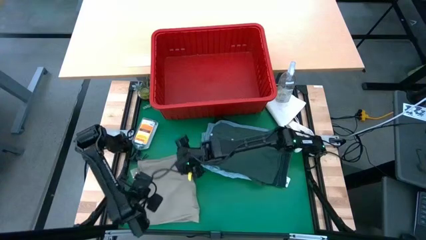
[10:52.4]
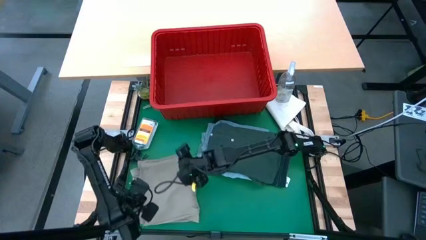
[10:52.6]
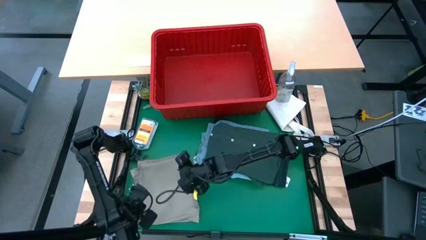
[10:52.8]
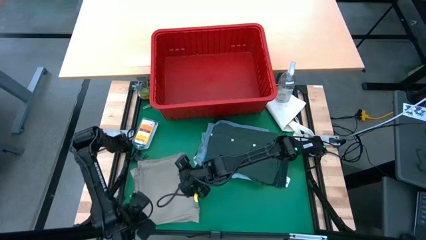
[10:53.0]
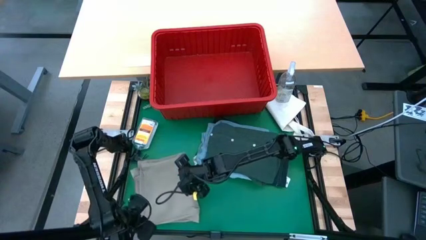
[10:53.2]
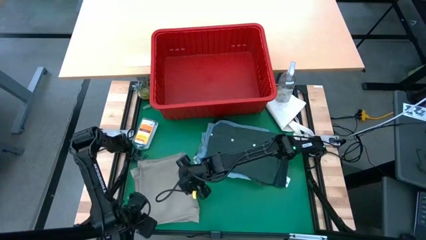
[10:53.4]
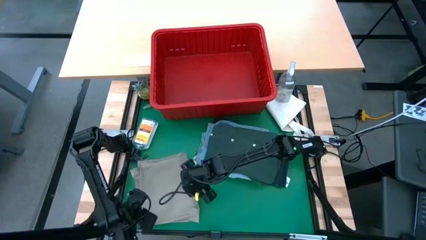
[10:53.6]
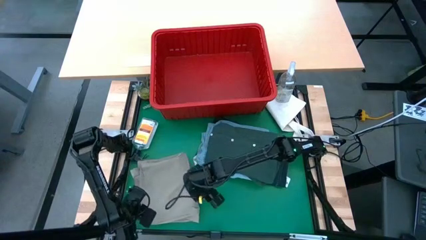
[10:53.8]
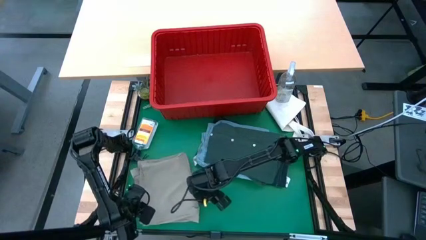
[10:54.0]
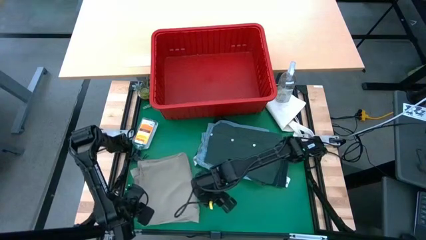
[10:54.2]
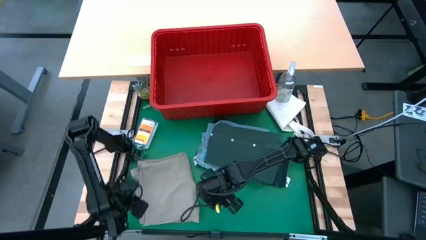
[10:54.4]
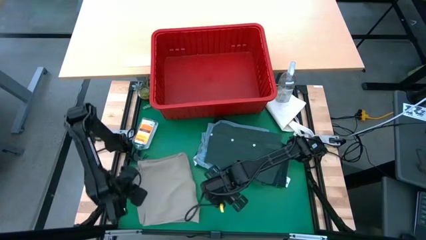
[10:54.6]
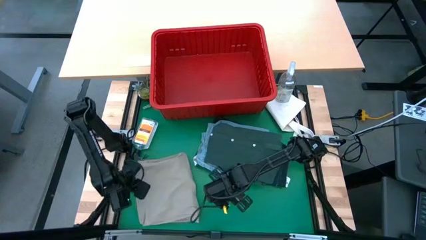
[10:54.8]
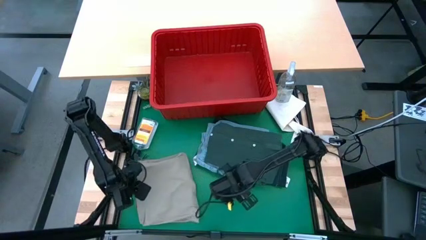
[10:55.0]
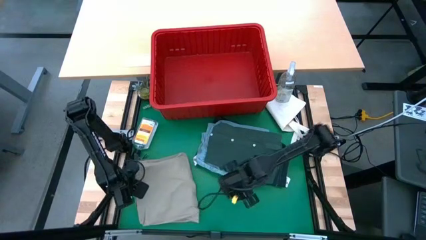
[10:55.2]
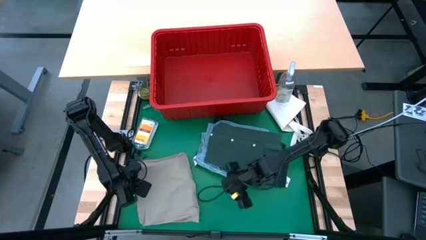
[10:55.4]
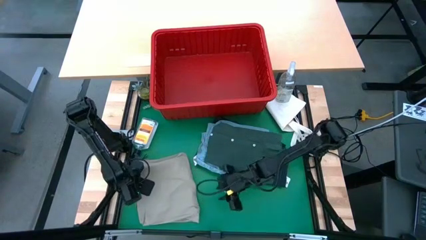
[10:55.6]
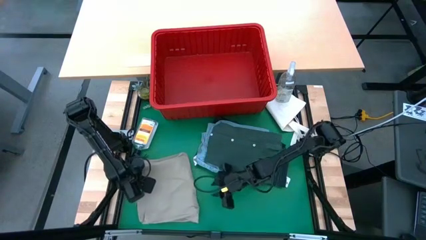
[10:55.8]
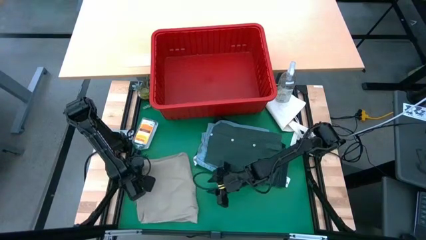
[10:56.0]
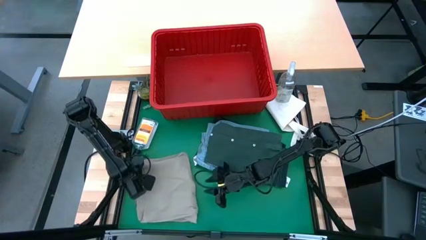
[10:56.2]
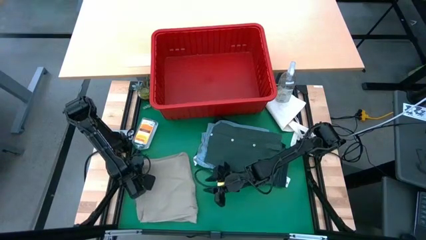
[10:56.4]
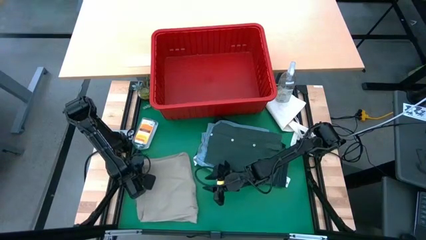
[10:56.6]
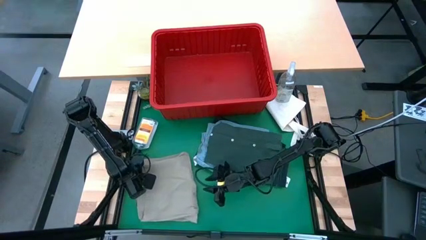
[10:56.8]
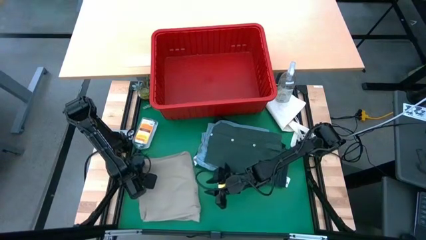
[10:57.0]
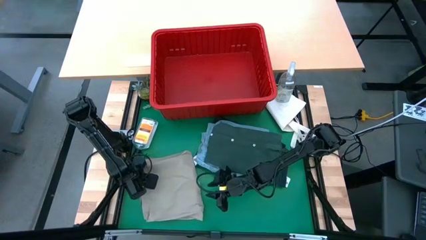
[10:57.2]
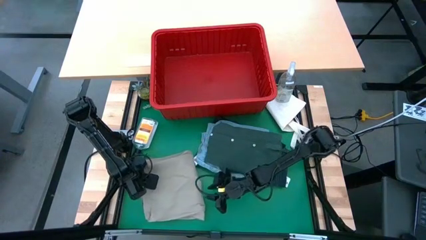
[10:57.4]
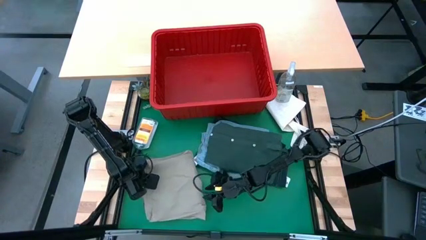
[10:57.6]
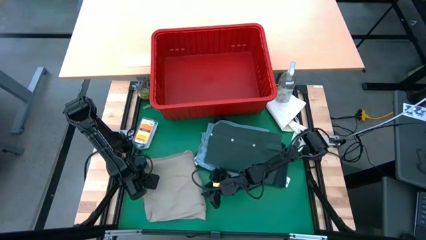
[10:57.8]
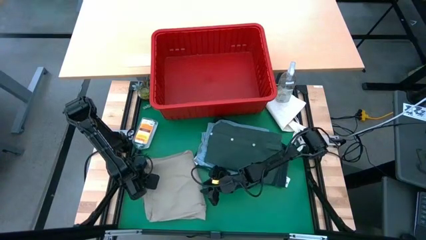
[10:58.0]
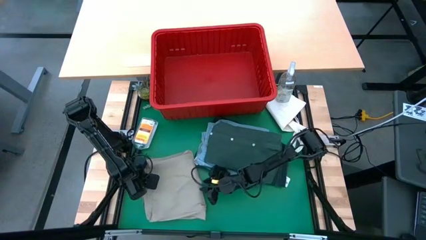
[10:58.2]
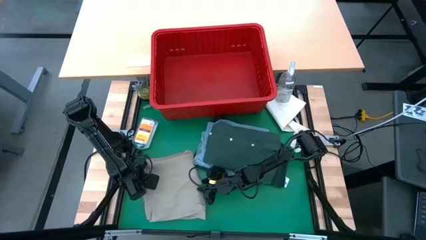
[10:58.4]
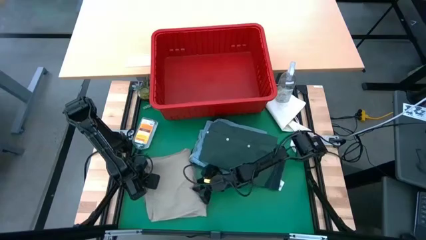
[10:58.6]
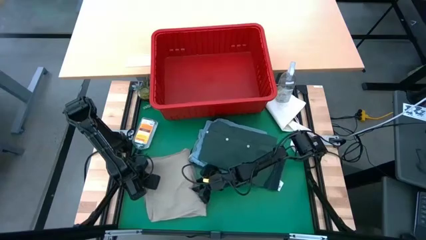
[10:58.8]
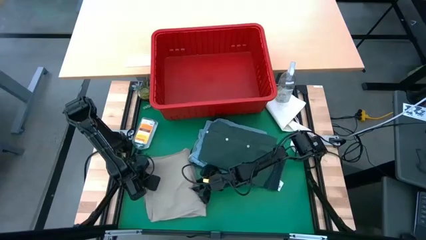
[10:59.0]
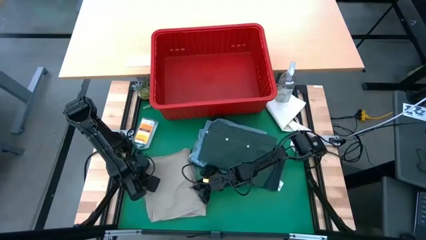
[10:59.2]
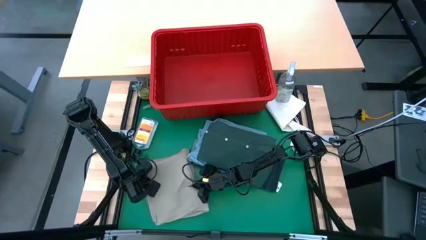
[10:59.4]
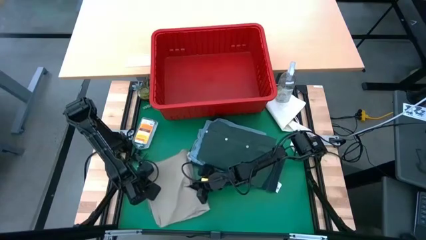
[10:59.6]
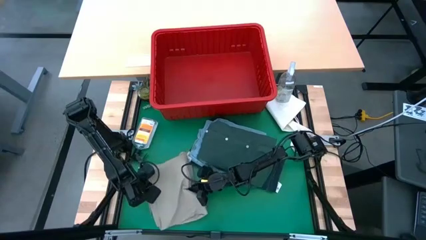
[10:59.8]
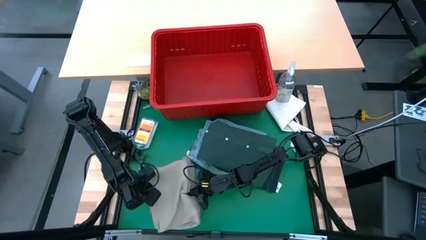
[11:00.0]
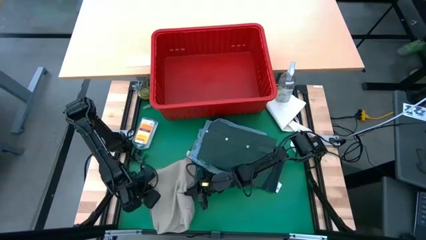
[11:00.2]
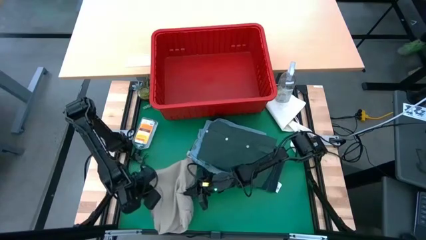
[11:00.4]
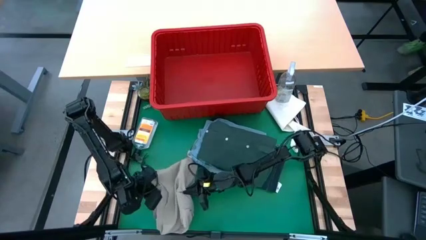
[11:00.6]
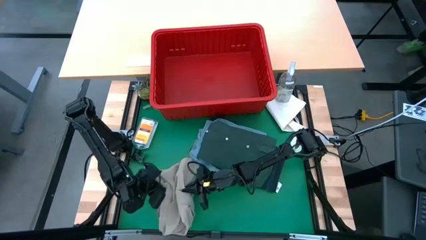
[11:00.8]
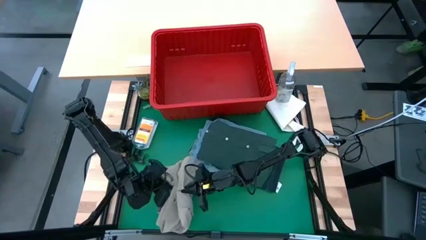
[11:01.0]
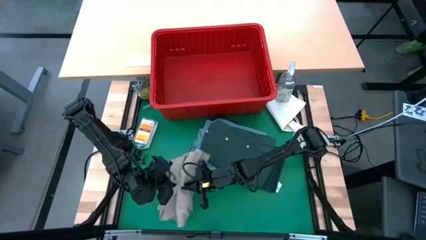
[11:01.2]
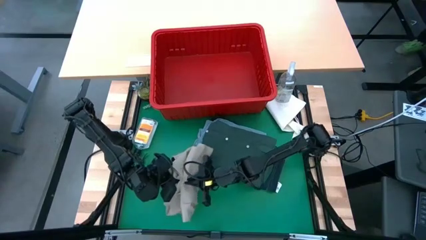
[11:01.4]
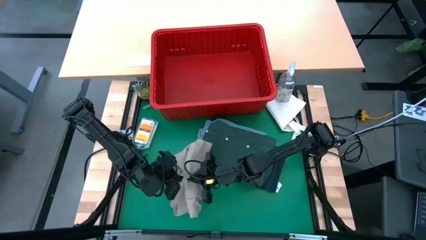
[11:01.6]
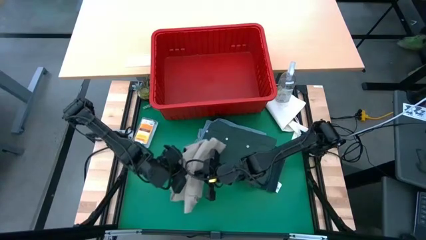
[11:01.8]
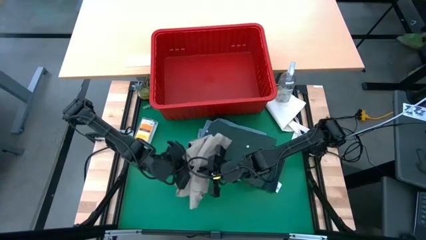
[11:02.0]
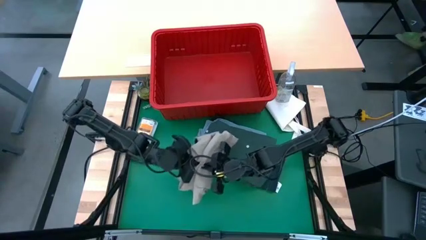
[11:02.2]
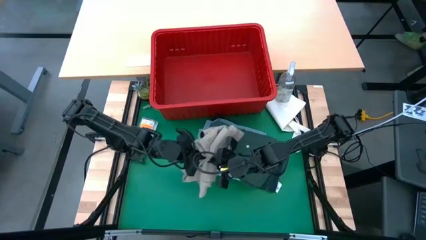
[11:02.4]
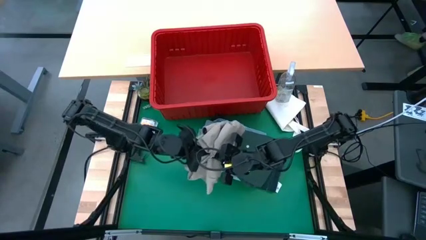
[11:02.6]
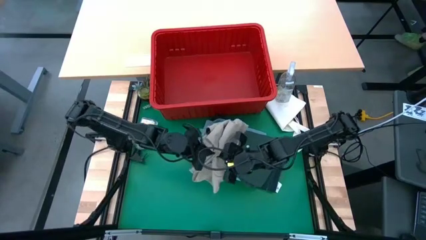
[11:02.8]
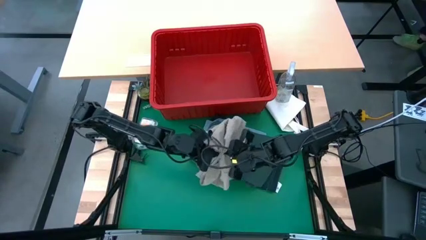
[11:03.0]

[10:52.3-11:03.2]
Task: Fold laundry
Stack the beige shorts on top of the green shirt

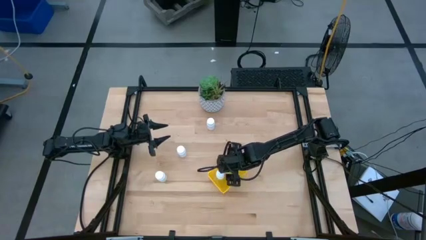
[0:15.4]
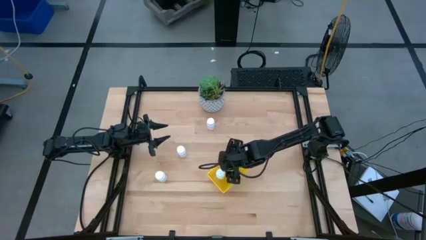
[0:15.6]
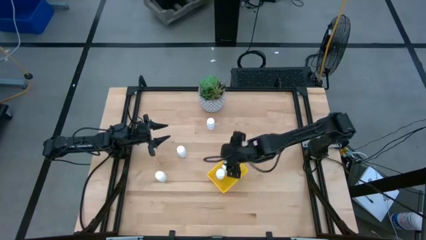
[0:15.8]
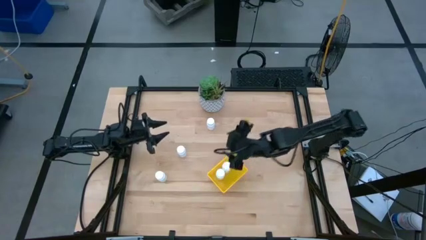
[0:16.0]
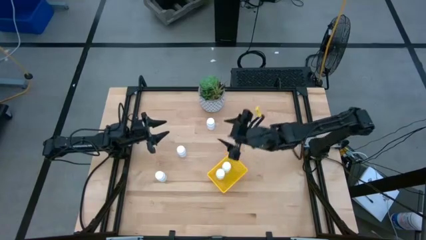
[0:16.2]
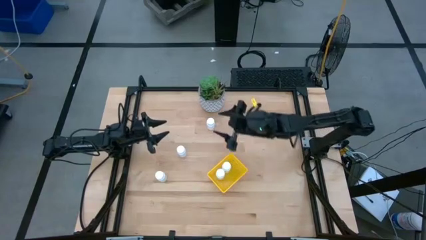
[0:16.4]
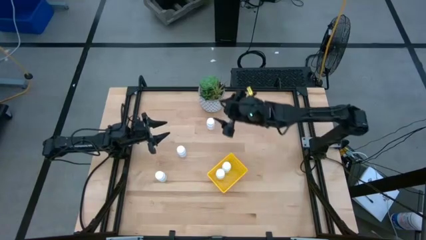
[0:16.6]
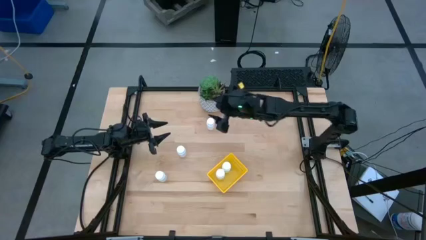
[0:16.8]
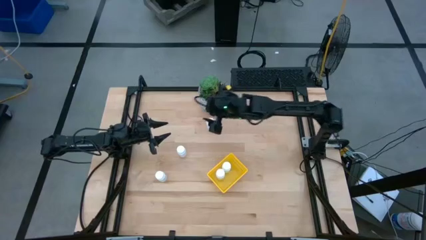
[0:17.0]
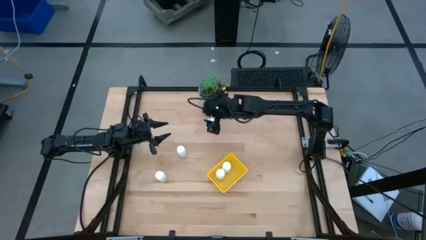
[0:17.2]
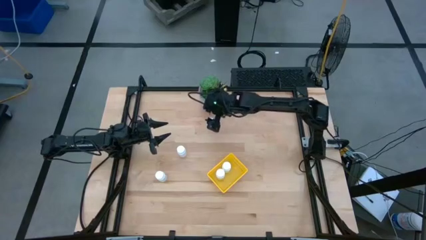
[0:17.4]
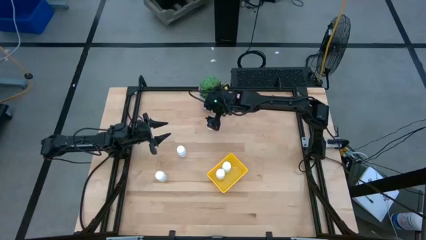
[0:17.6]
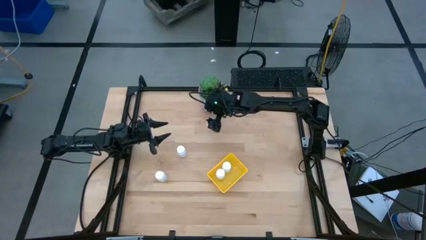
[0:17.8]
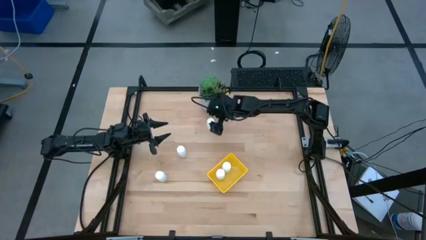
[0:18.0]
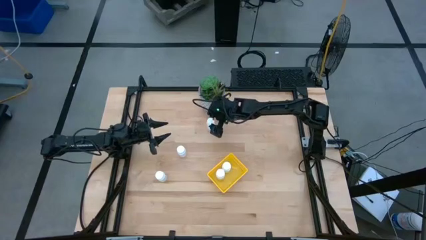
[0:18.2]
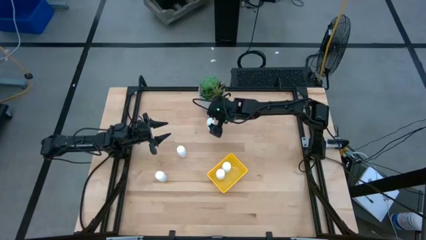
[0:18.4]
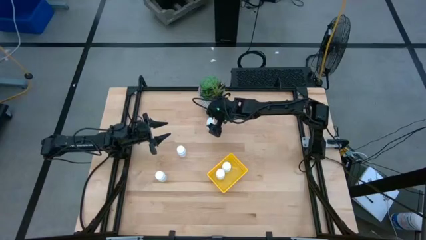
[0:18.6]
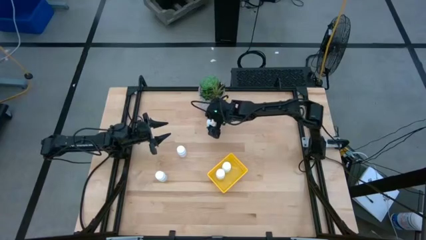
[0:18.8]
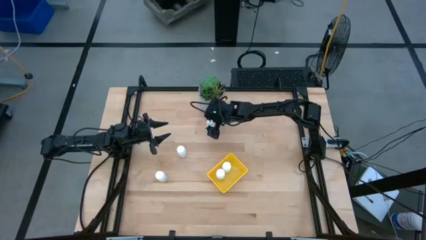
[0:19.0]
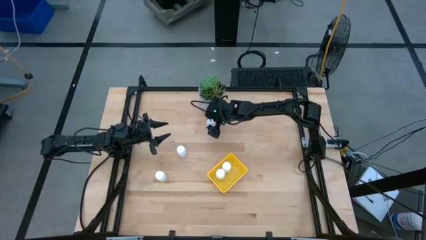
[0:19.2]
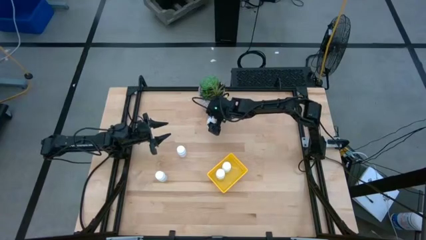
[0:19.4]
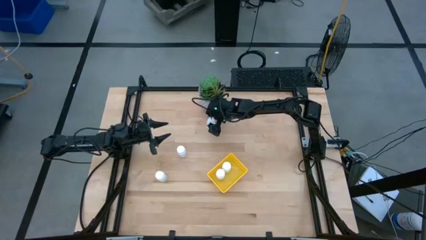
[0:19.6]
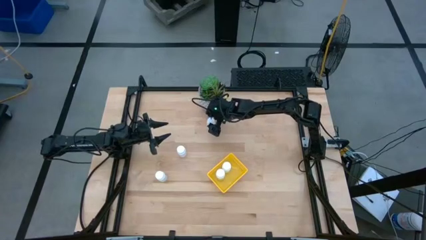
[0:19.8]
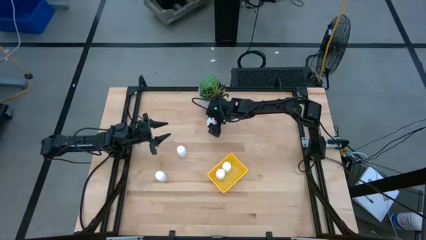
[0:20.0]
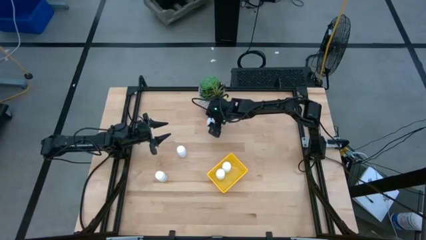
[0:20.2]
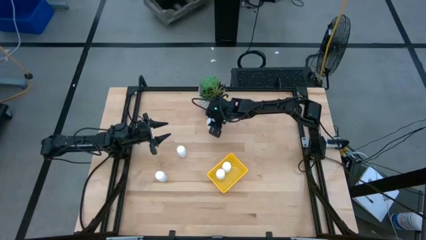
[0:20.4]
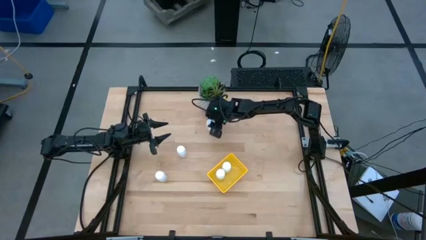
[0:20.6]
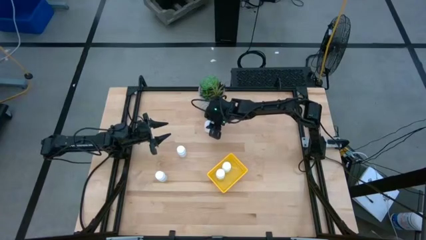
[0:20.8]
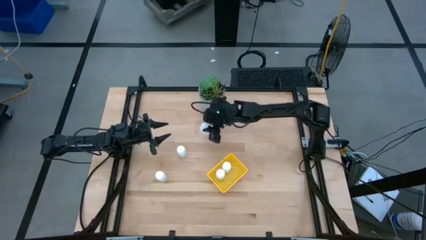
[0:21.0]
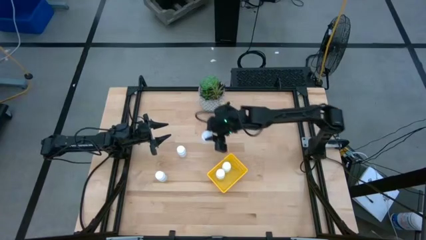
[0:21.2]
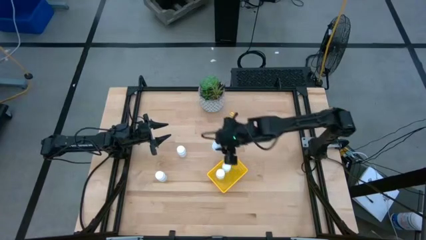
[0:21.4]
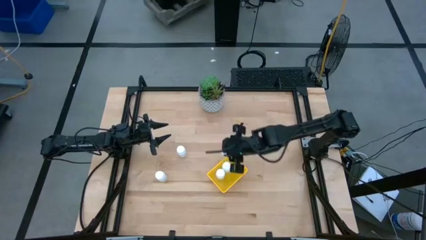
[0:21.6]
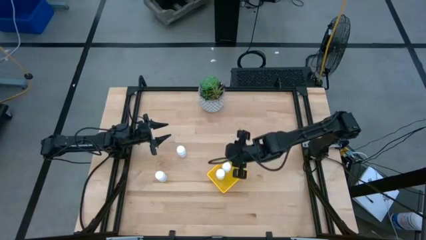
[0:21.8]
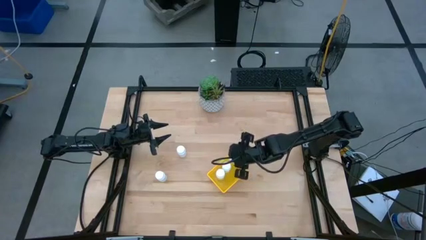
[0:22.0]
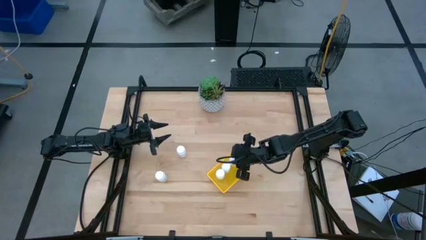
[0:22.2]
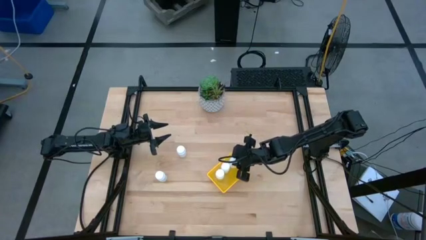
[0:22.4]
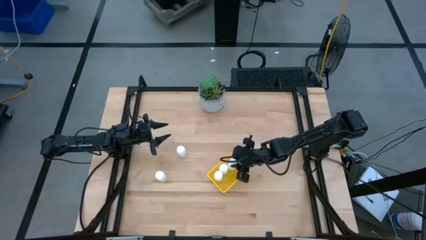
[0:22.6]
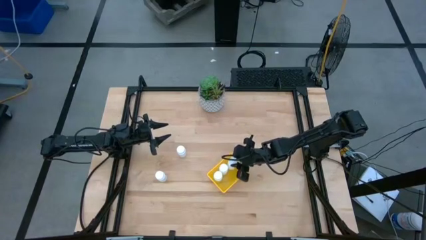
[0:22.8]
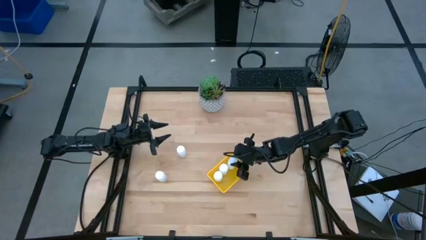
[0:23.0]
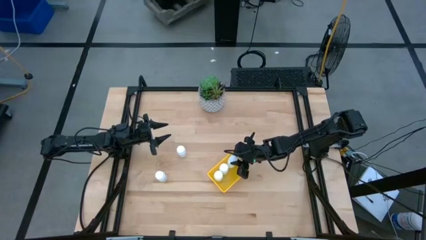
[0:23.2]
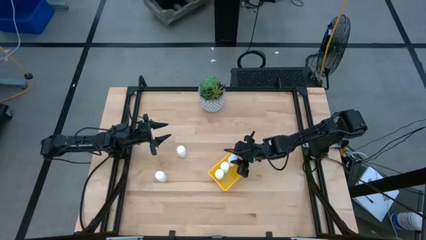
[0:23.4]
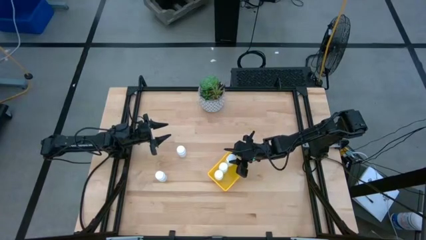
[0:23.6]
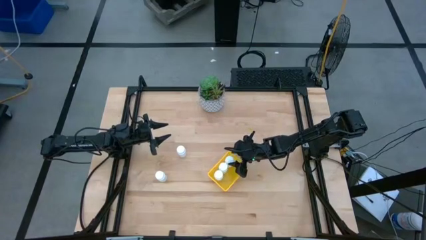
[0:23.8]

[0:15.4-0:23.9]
Task: Pick and place pill bottles into a basket
Put the white pill bottle into the yellow basket
